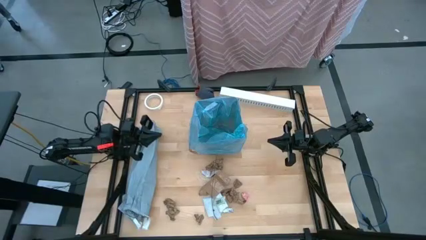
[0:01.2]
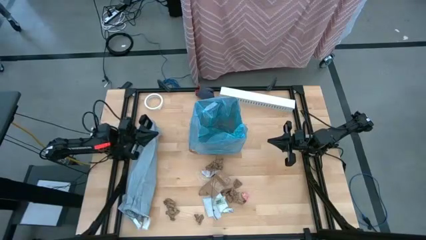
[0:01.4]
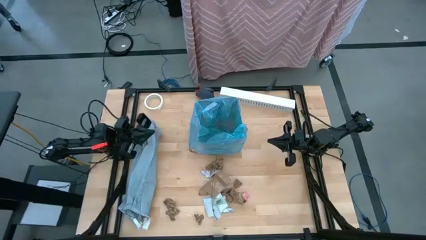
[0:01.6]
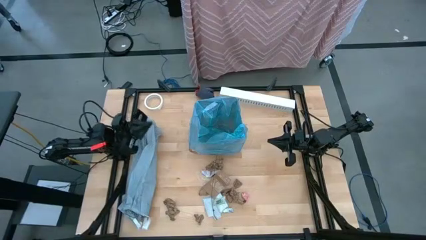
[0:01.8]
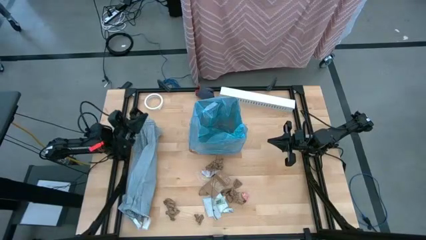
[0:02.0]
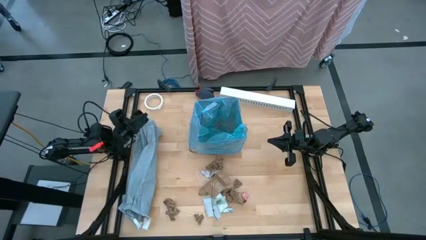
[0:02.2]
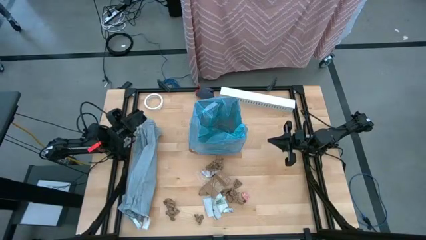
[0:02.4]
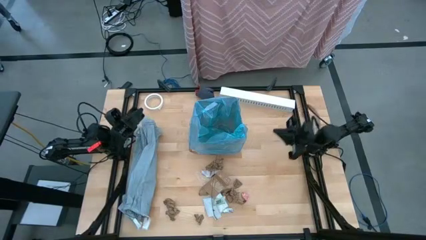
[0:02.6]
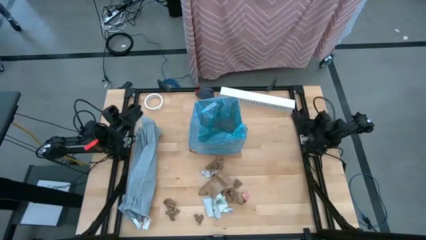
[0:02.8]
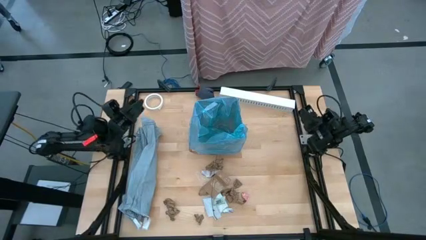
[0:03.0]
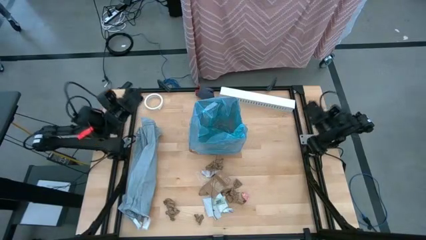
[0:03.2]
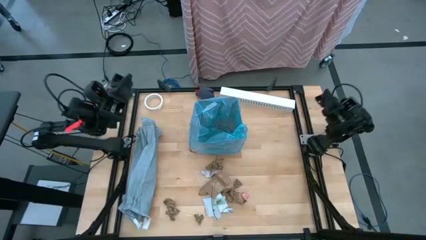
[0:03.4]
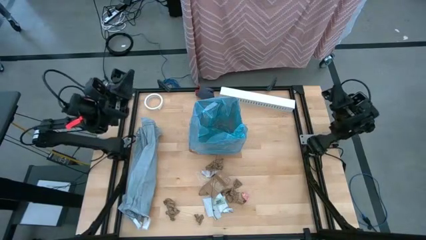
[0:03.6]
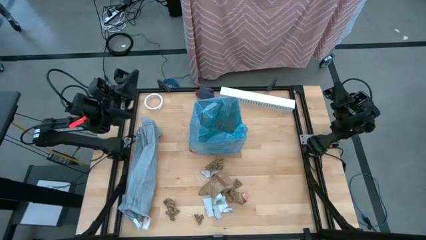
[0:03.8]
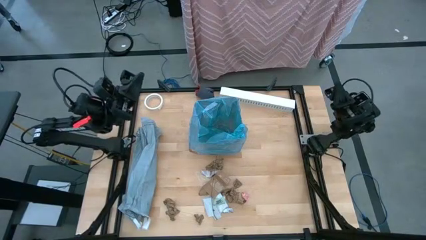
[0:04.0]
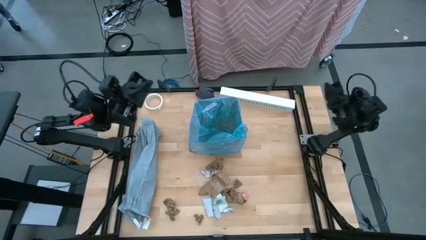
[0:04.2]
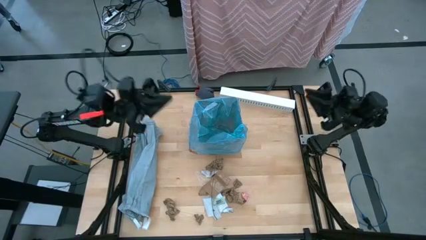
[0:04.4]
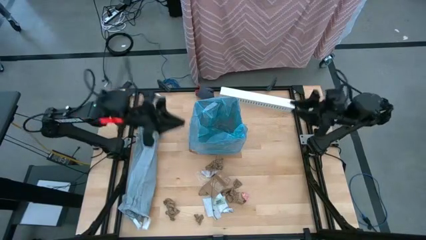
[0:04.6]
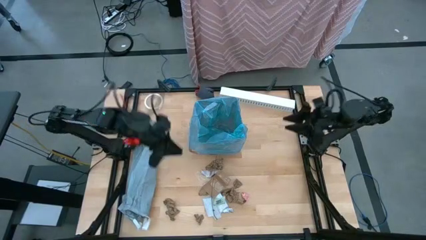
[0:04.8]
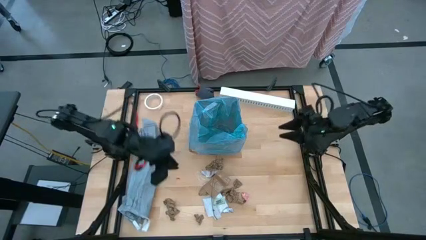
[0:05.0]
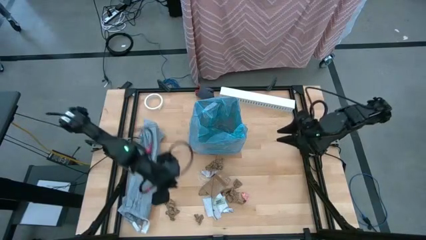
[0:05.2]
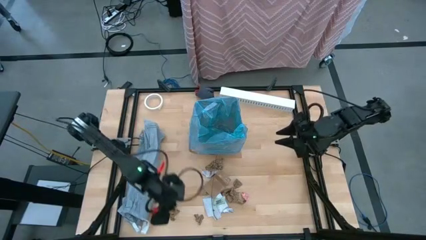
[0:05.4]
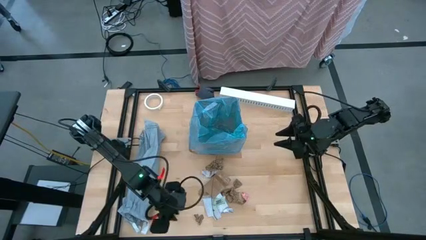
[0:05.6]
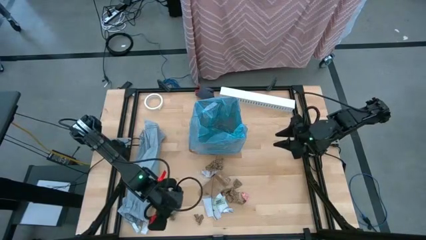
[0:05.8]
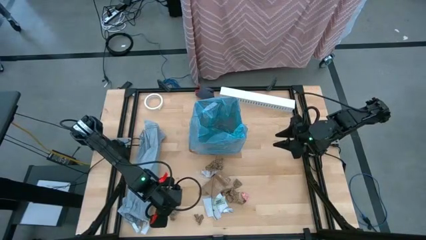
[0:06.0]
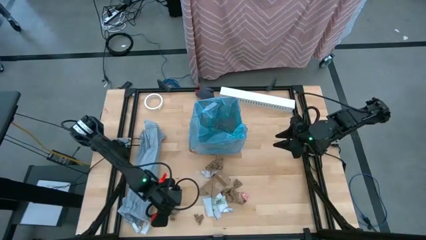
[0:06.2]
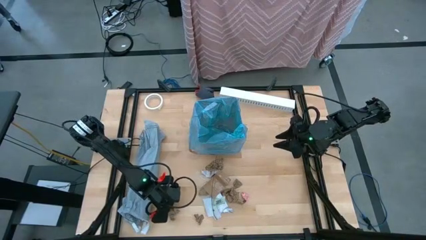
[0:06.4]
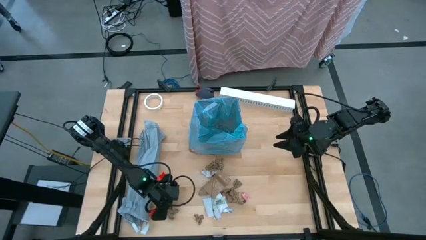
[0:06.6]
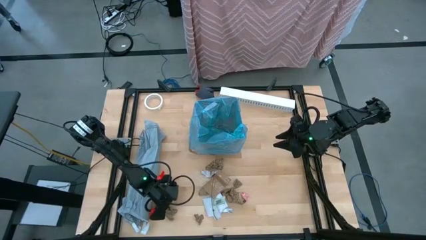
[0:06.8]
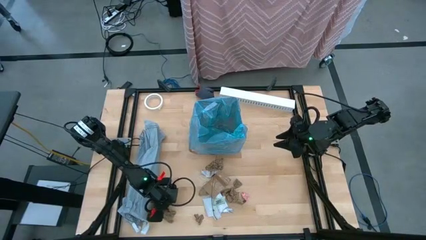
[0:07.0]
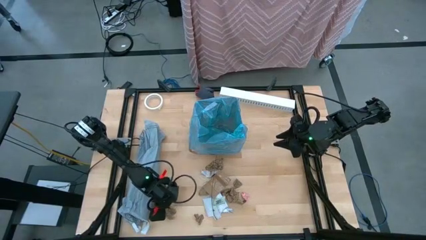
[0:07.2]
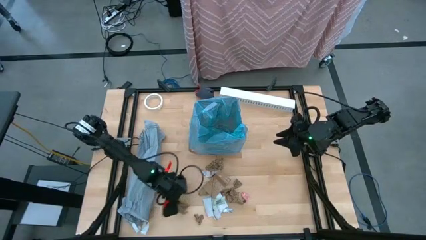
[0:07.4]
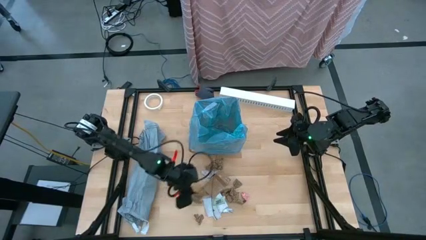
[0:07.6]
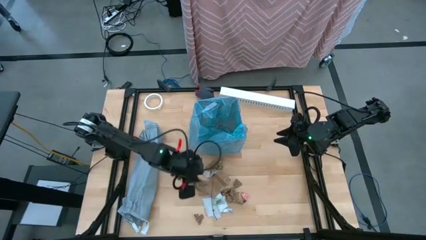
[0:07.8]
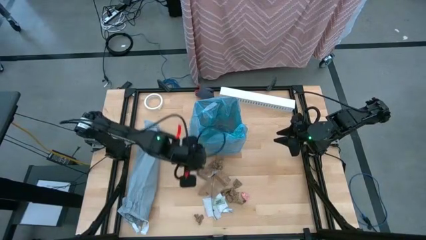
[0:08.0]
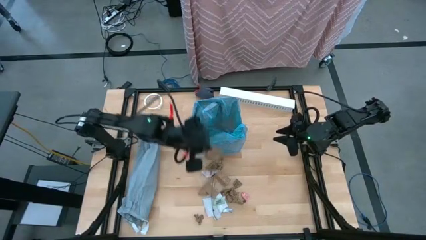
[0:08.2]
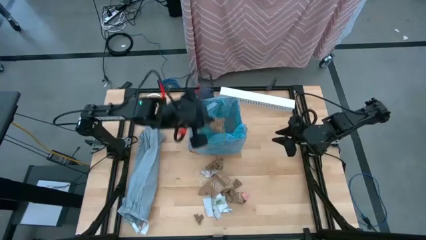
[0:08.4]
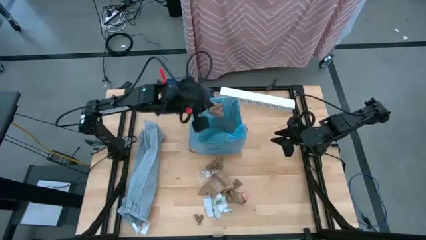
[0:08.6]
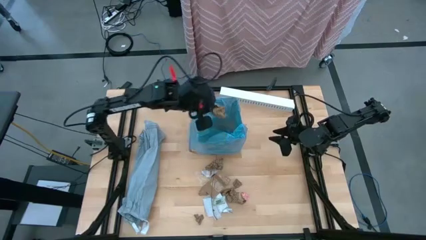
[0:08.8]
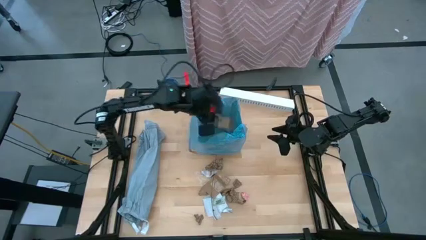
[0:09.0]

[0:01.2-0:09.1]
Task: place trash/remove bag and relplace
Put the brown napkin into the trash bin

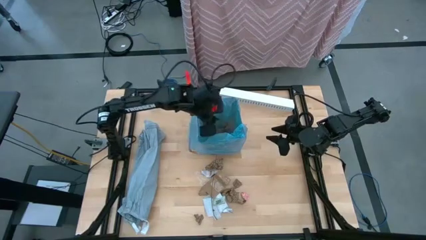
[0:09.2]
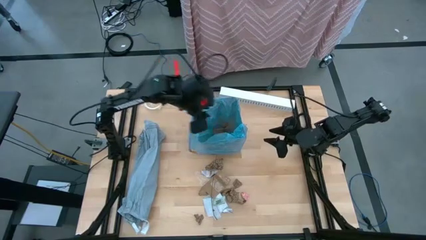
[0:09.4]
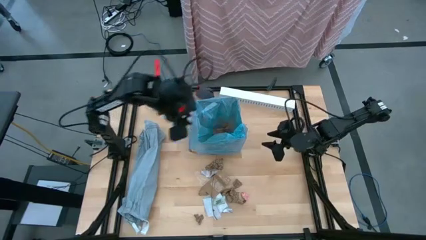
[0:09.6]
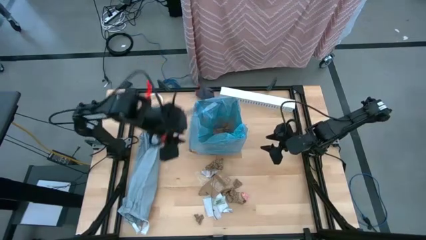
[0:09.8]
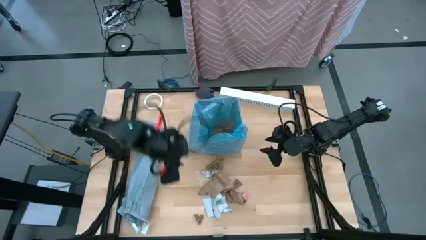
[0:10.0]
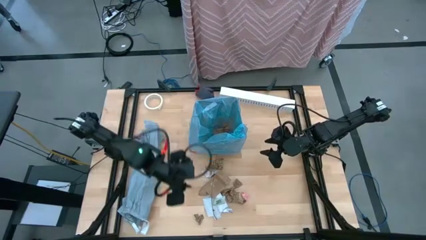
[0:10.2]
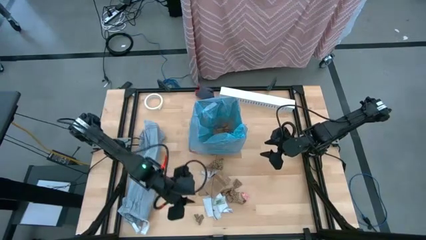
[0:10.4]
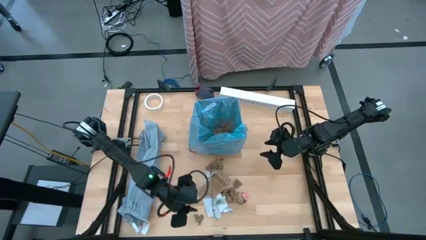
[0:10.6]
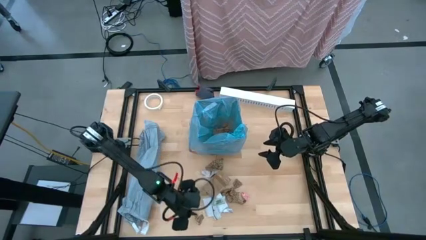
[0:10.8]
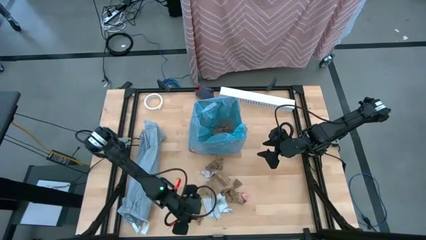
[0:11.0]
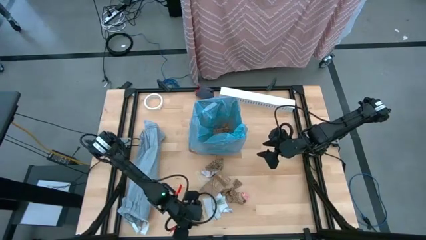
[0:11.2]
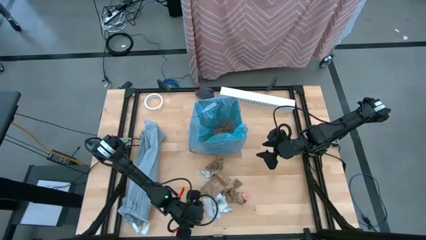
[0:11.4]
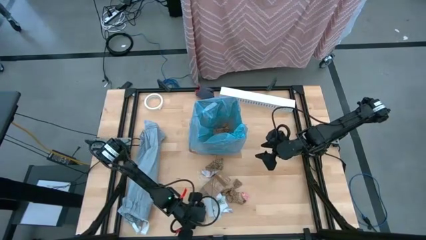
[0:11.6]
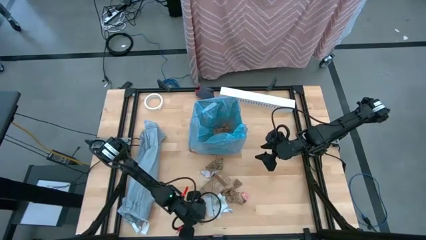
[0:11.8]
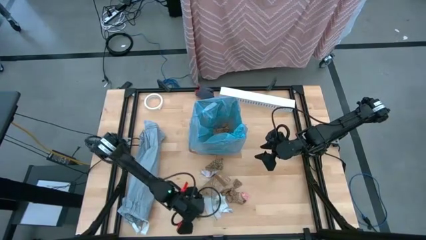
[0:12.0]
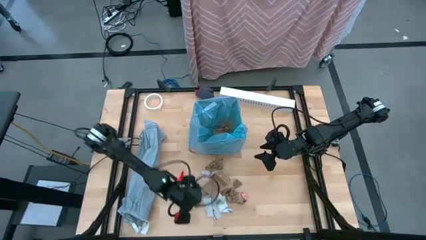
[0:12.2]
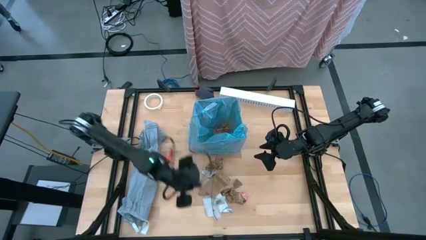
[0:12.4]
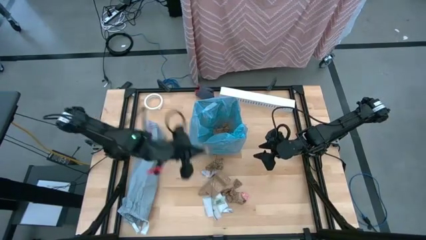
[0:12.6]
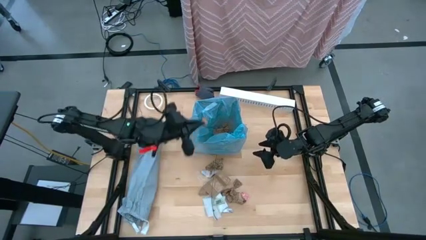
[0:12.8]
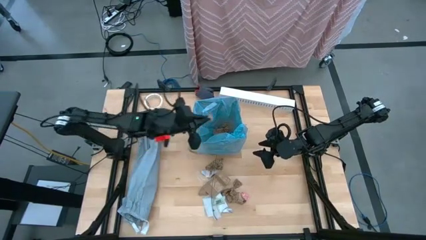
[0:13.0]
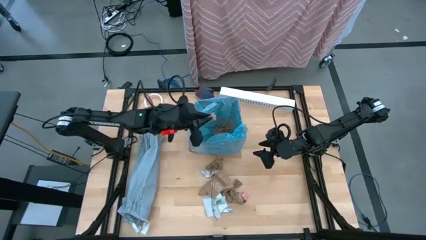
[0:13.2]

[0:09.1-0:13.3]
Put the brown napkin into the trash bin

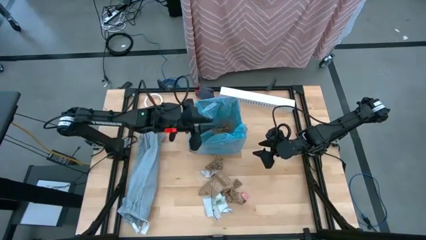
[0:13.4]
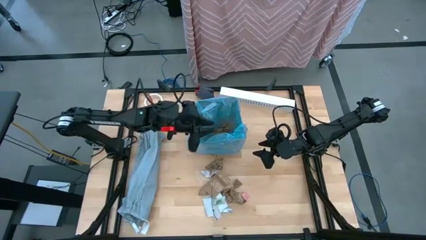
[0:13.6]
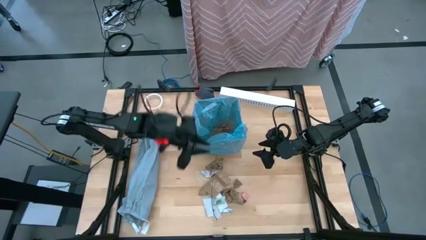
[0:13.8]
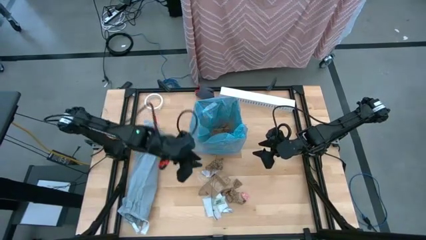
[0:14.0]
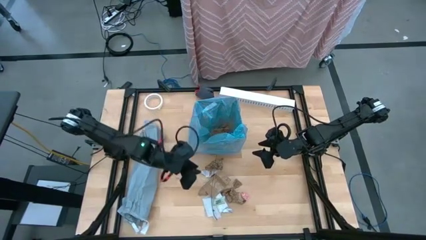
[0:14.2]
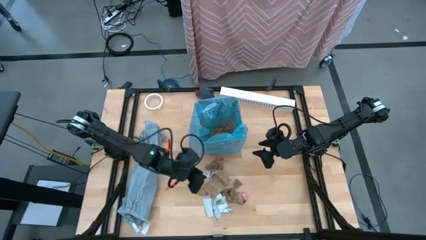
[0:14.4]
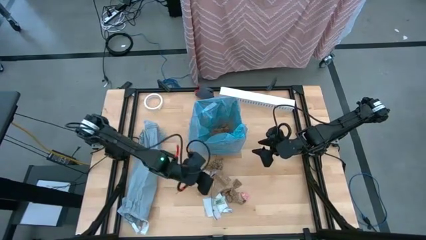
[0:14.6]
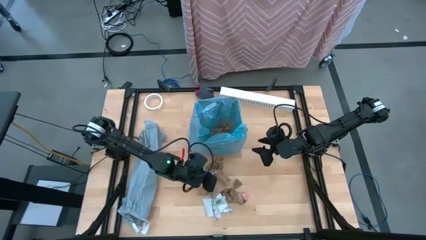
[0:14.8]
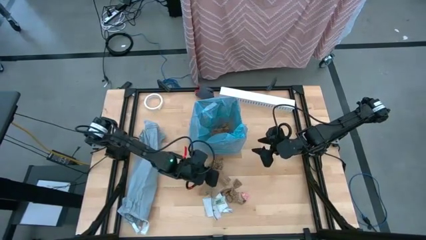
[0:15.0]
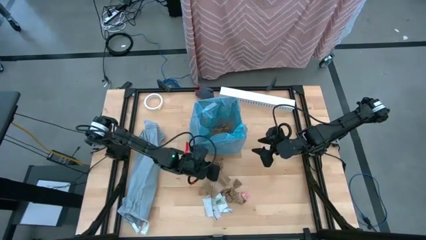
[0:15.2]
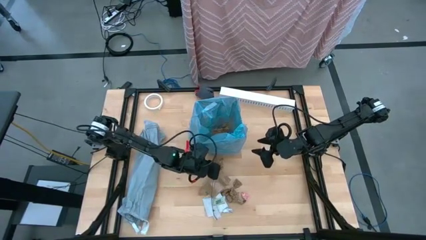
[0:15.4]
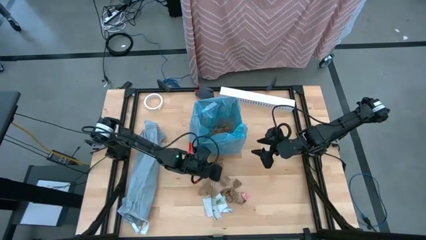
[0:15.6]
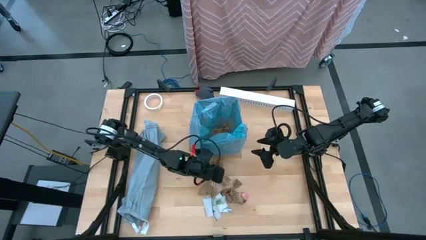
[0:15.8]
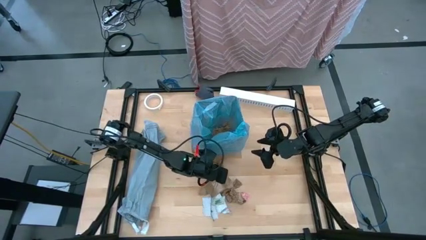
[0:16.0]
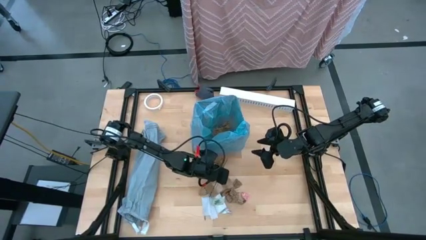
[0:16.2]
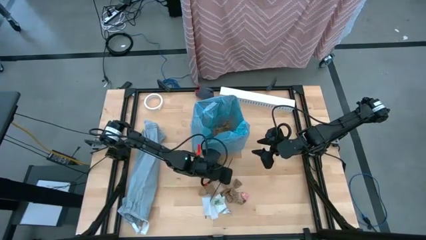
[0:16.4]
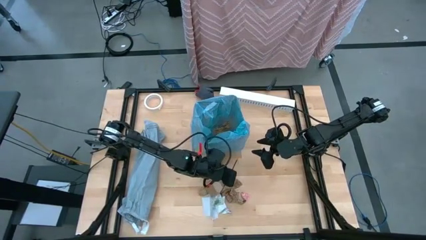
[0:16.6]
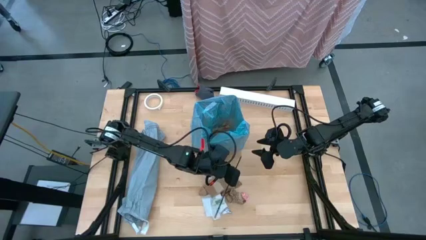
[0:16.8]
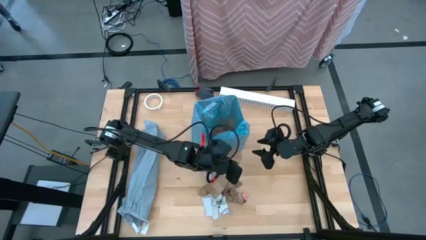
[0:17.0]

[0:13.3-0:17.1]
Put the black zip tie into the trash bin
